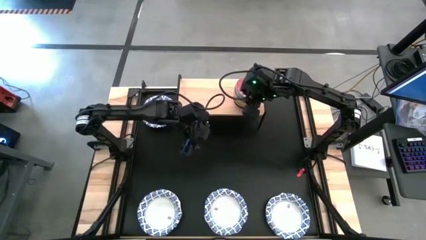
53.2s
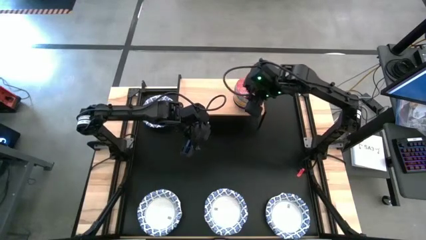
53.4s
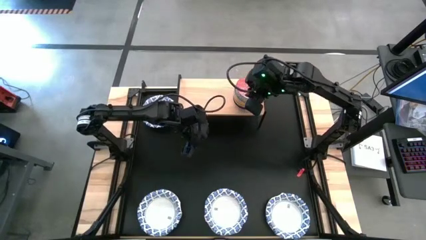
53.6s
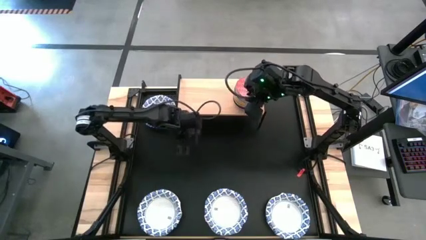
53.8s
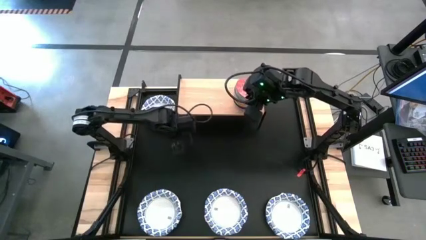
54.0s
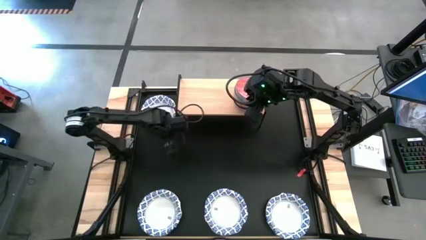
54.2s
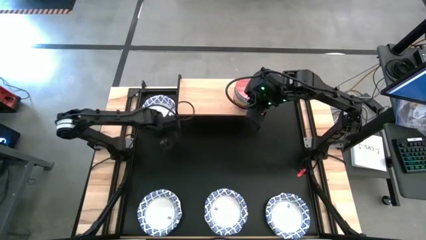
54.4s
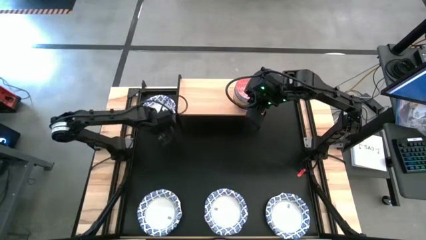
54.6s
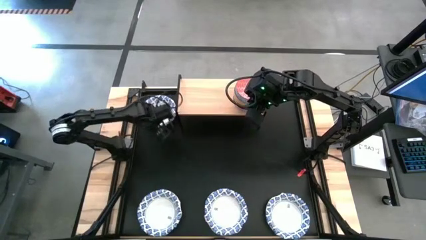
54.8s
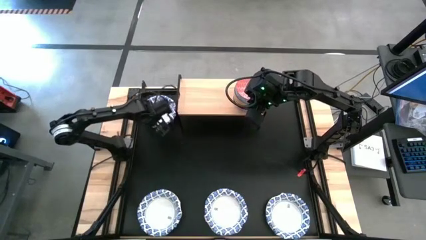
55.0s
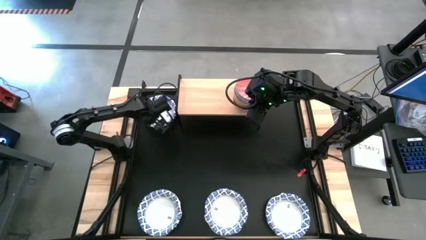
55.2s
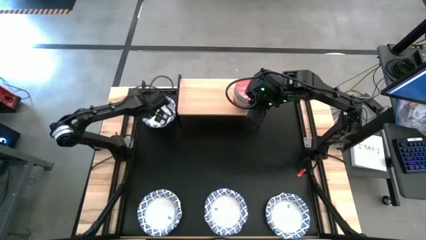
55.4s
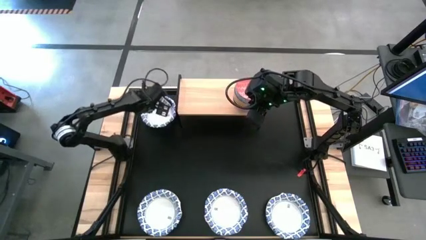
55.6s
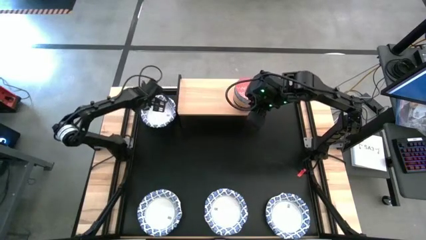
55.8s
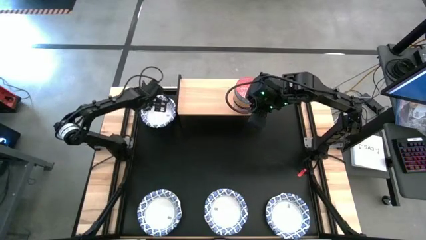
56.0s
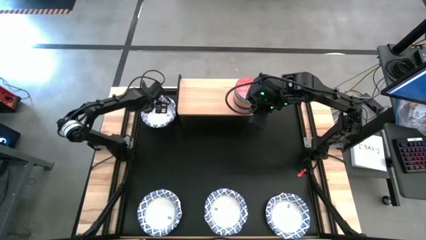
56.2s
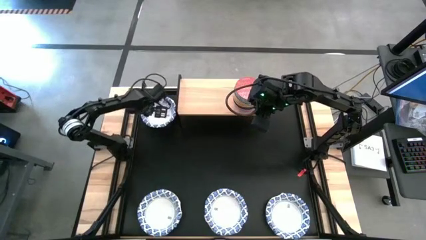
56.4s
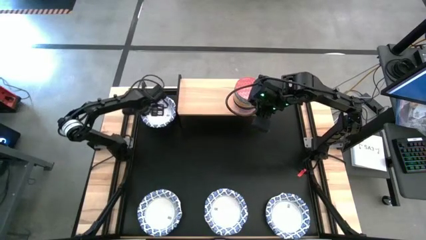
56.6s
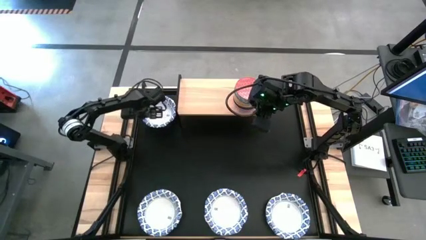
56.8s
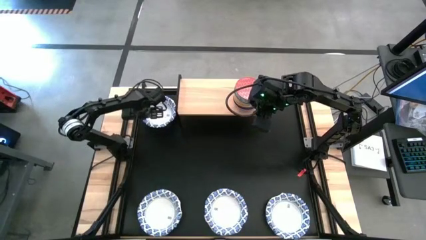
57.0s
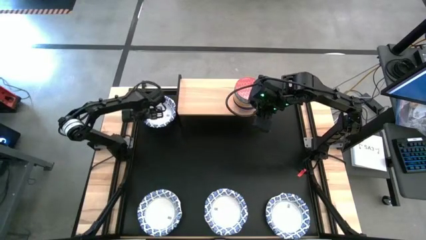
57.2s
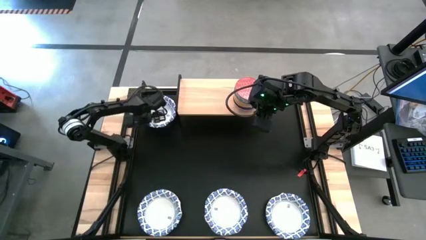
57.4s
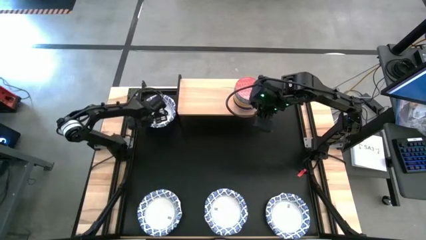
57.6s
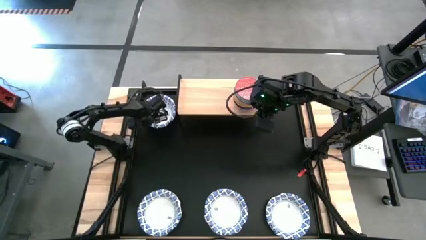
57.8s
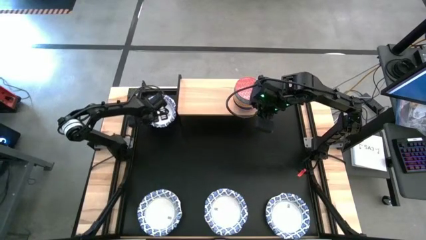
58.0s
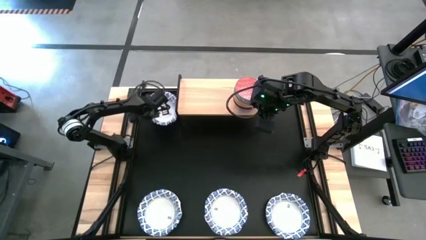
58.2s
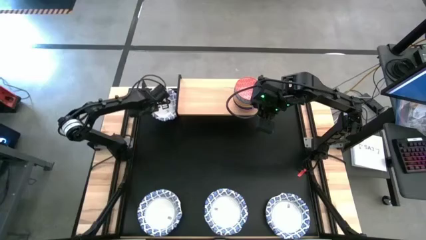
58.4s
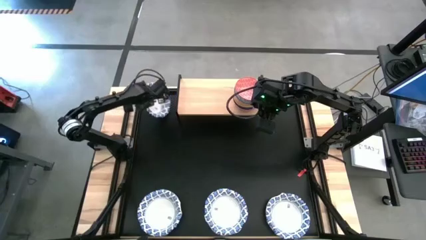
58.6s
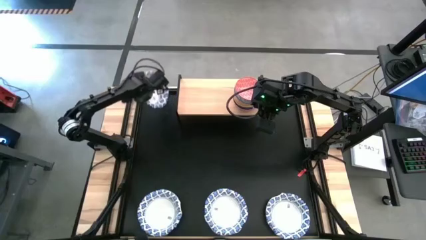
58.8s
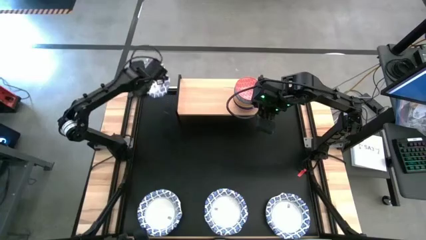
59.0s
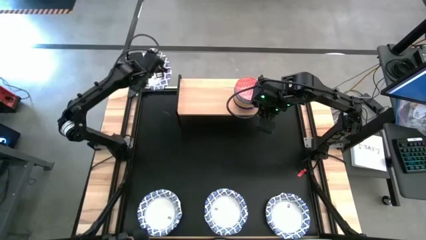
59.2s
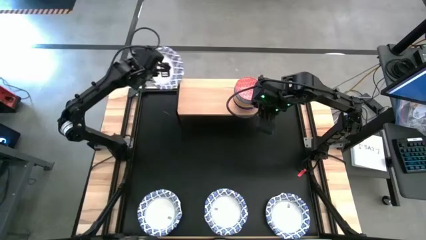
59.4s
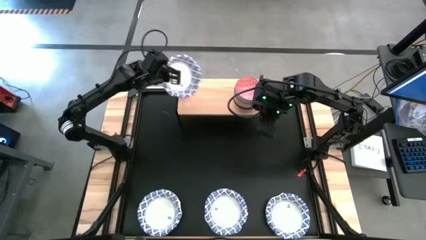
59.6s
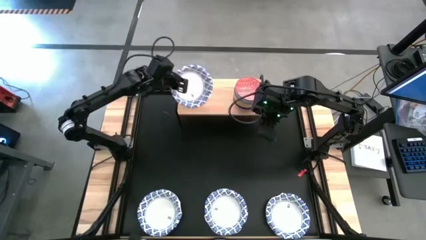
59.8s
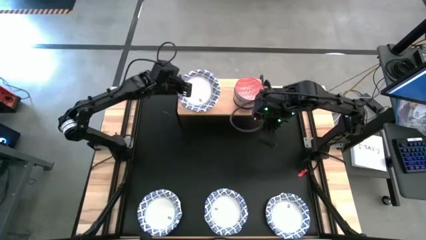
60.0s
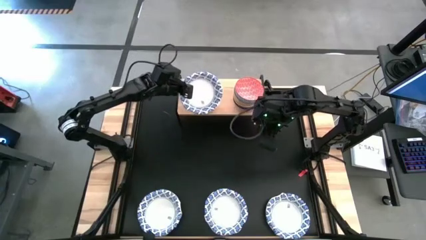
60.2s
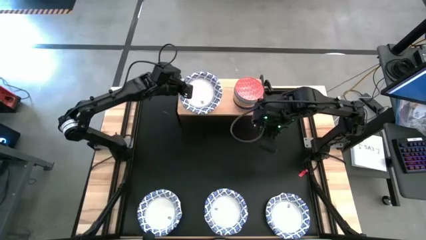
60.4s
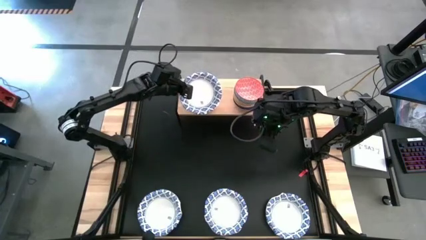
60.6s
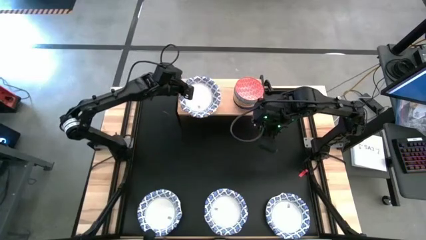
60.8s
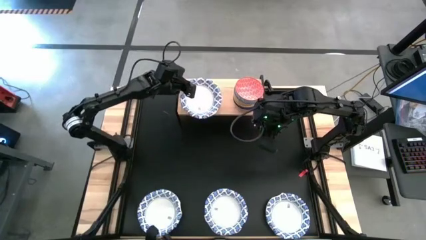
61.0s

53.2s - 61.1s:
Task: Place and stack bowls onto a shelf
Put the blue bowl on the shelf

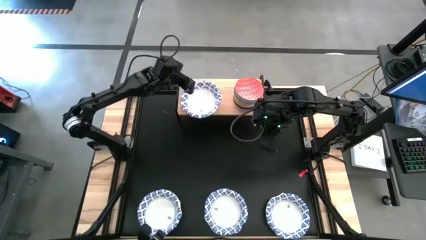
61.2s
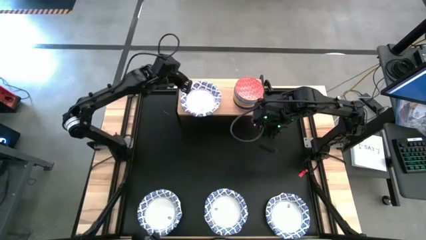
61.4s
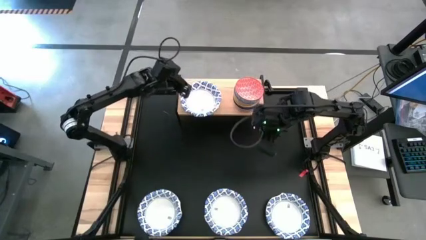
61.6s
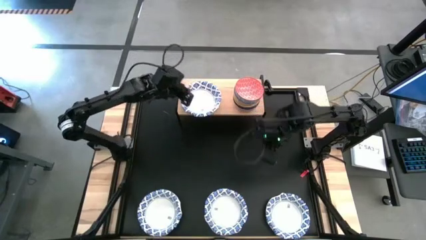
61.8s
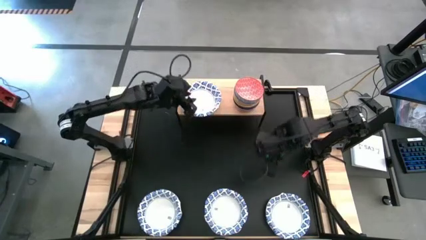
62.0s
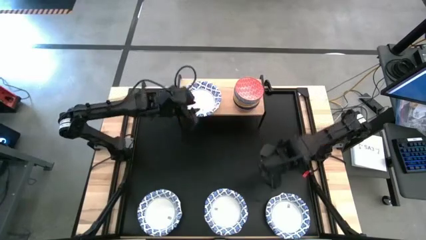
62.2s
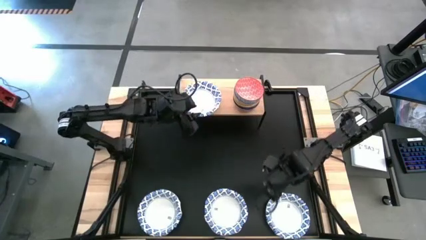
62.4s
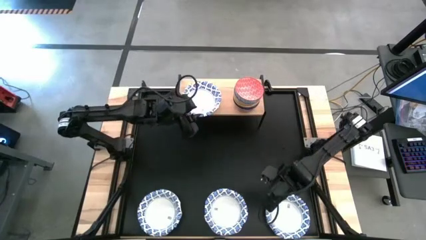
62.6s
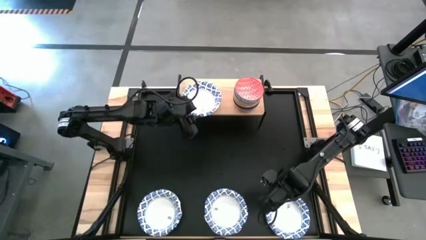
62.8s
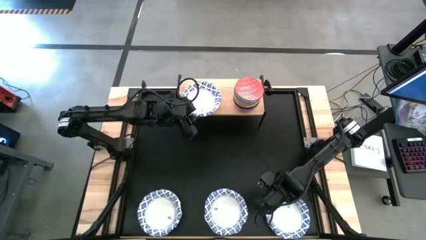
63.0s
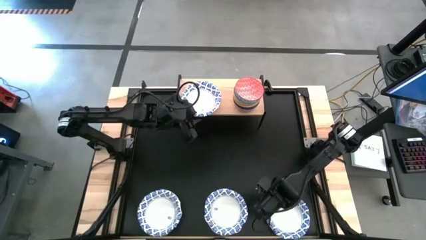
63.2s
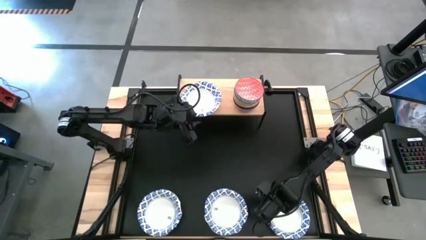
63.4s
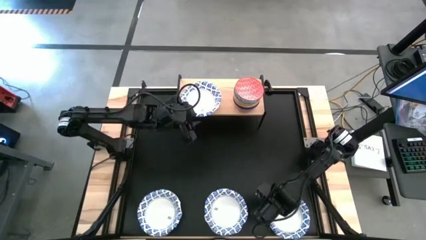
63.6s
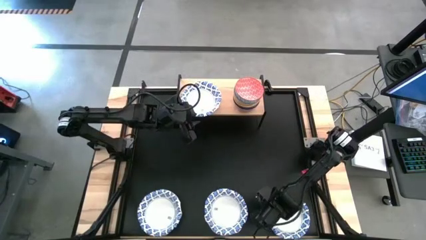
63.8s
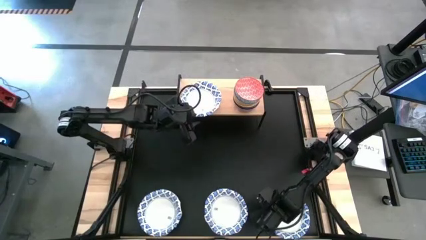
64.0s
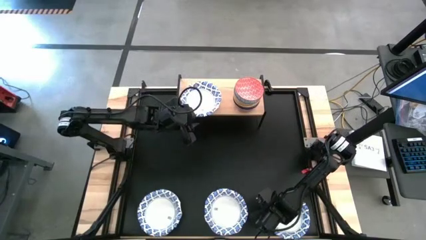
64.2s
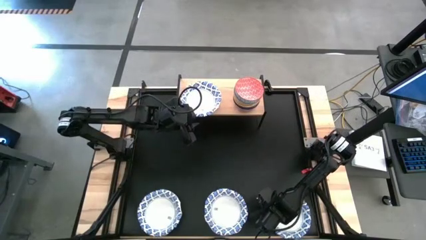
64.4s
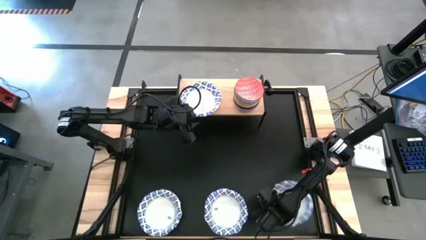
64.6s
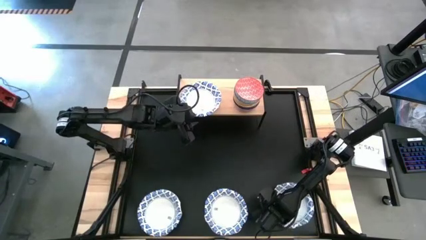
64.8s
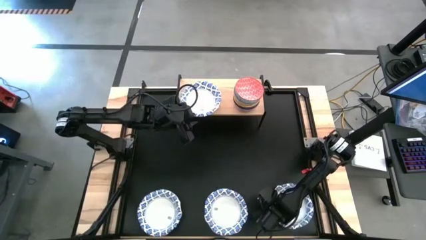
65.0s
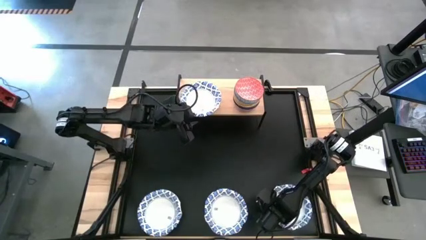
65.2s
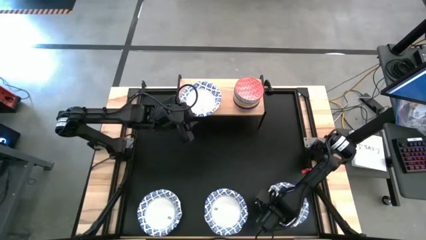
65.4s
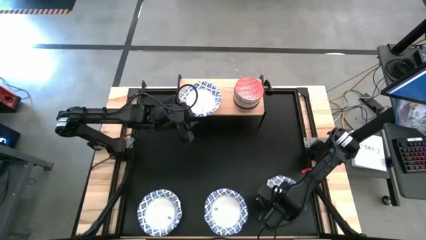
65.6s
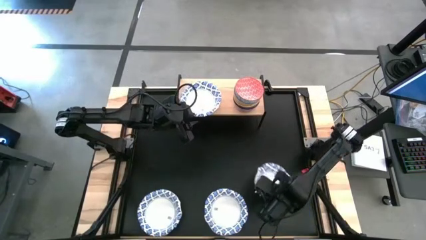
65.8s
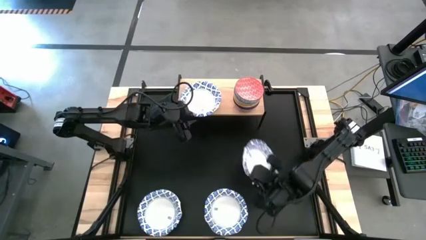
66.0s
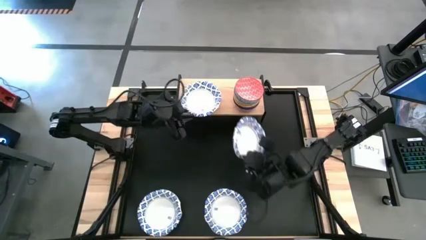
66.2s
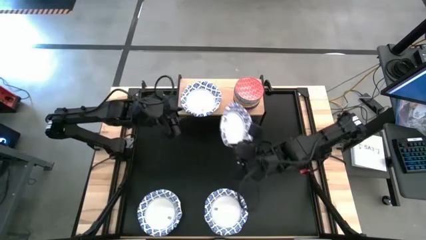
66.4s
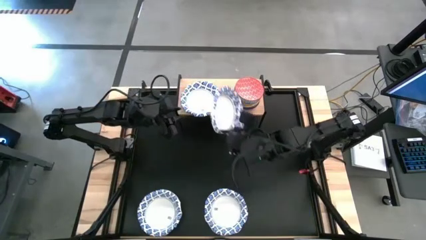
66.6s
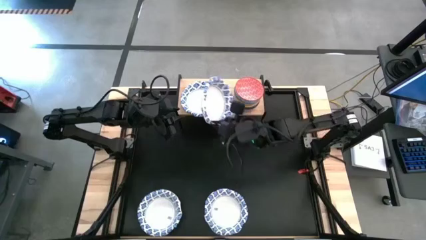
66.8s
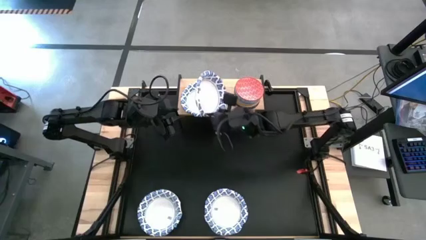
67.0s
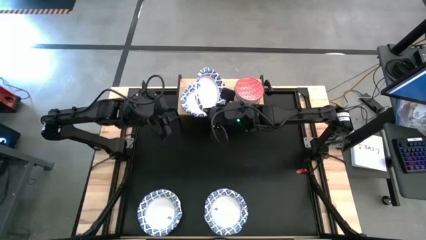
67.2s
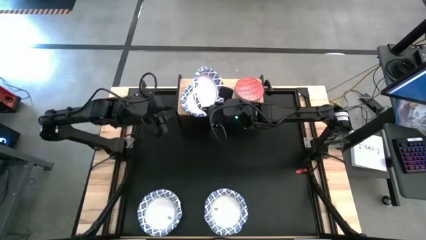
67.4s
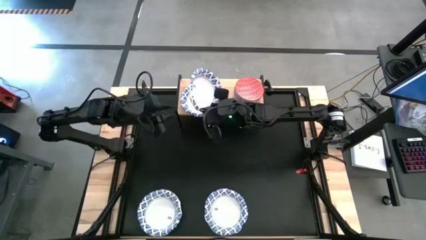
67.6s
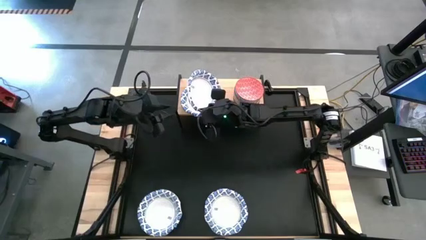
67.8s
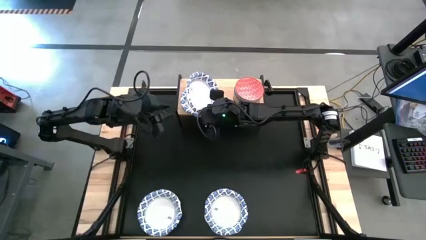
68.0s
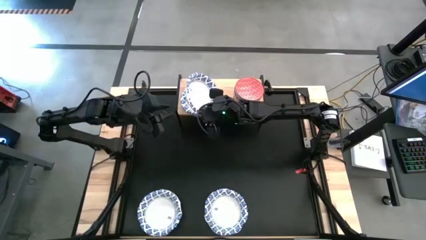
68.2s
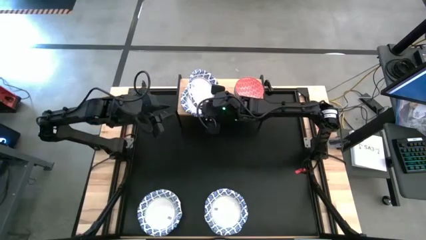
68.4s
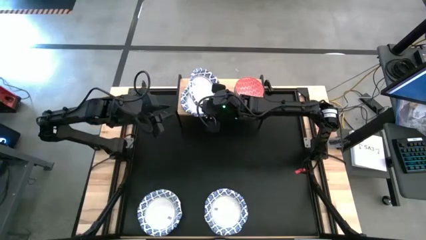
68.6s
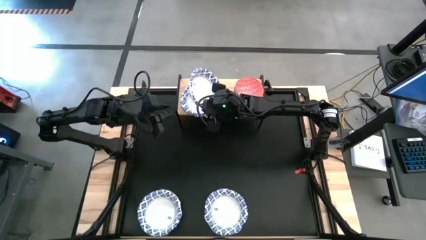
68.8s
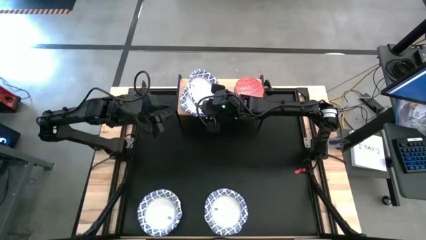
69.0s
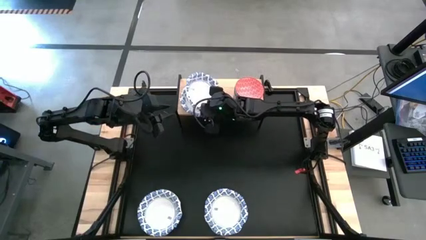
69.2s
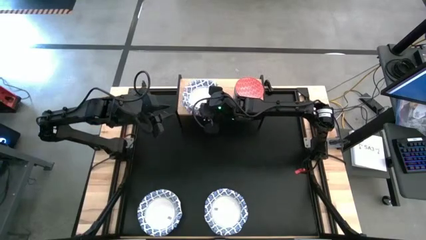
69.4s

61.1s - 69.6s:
Stack the blue bowl on top of the bowl on the shelf
